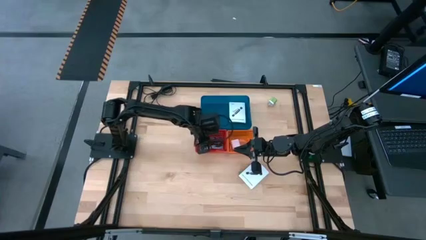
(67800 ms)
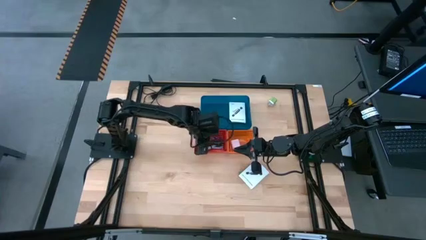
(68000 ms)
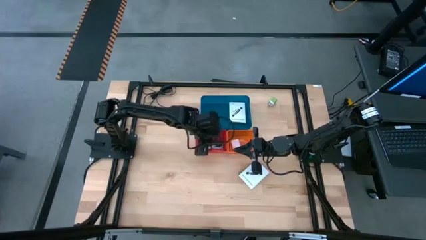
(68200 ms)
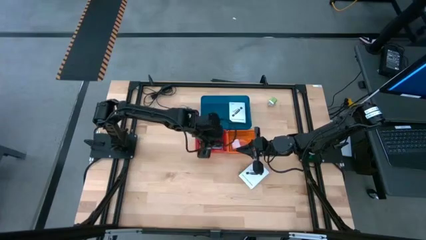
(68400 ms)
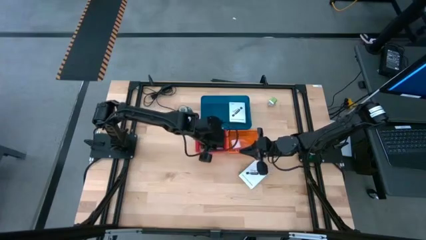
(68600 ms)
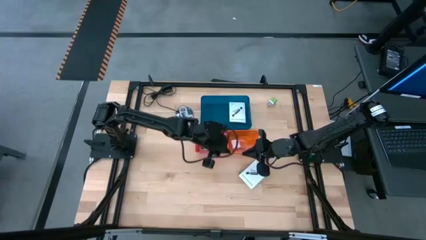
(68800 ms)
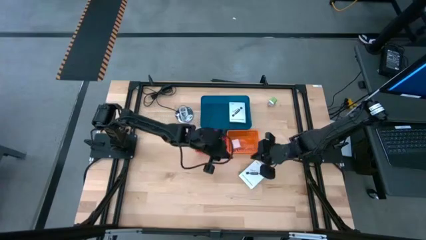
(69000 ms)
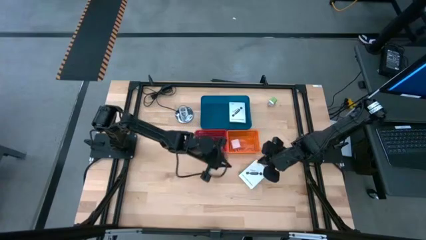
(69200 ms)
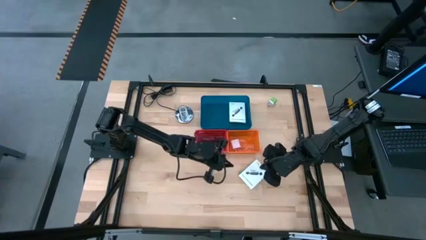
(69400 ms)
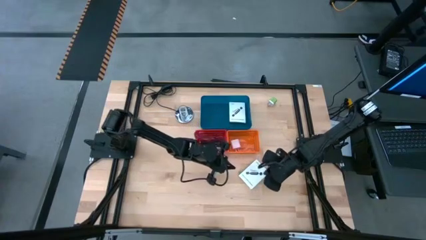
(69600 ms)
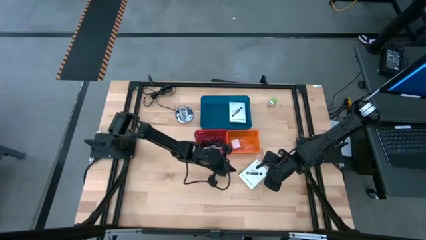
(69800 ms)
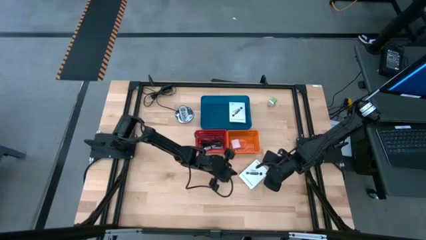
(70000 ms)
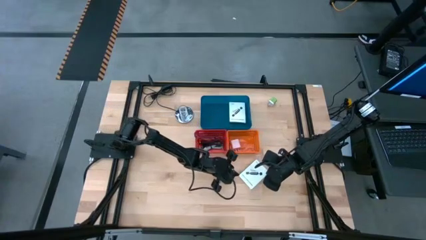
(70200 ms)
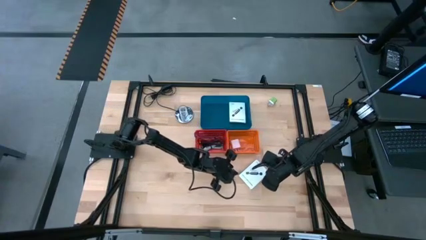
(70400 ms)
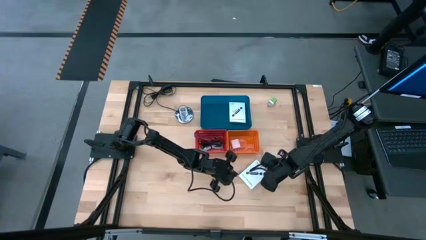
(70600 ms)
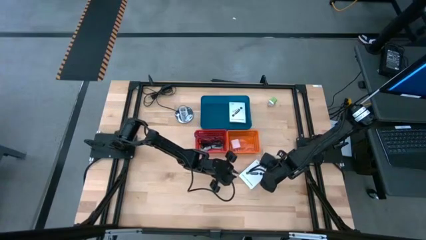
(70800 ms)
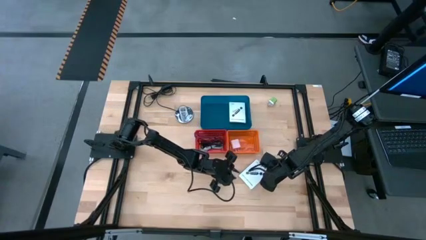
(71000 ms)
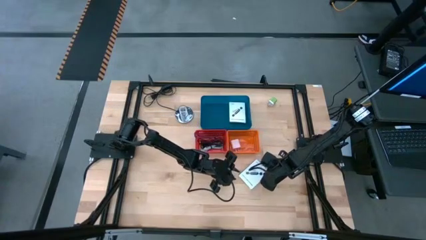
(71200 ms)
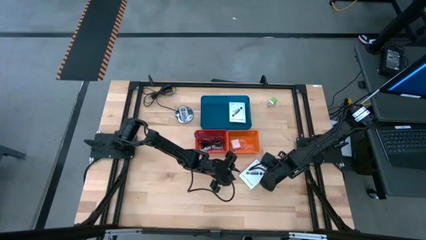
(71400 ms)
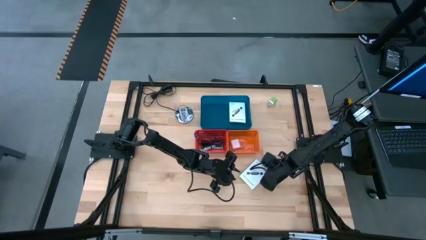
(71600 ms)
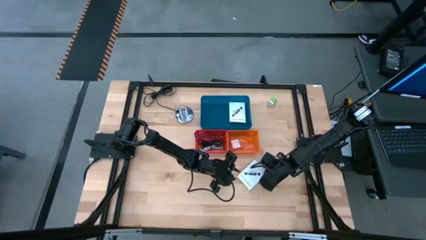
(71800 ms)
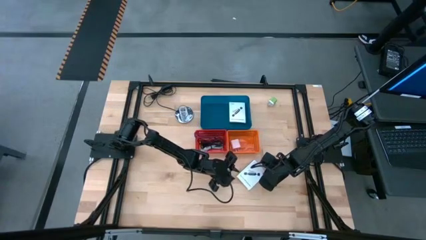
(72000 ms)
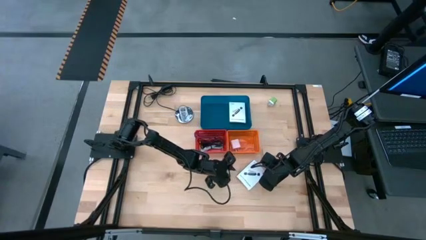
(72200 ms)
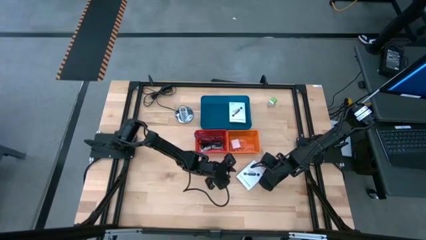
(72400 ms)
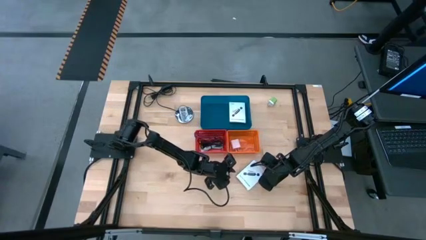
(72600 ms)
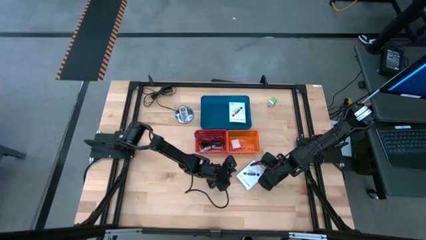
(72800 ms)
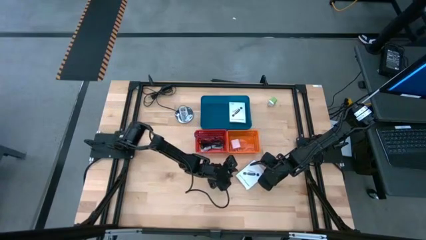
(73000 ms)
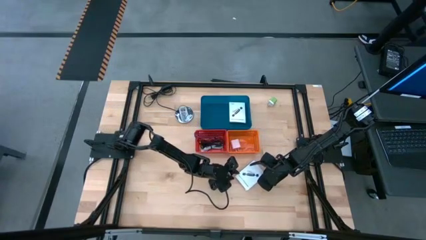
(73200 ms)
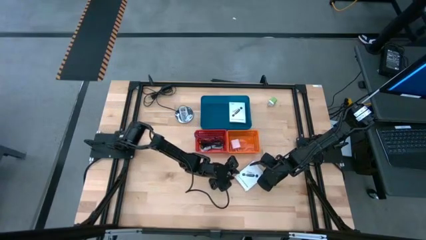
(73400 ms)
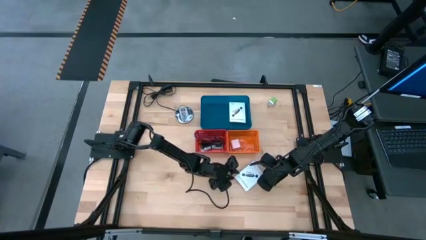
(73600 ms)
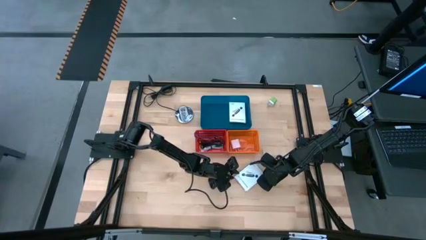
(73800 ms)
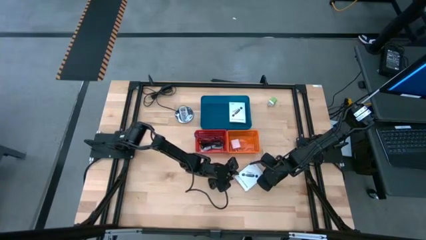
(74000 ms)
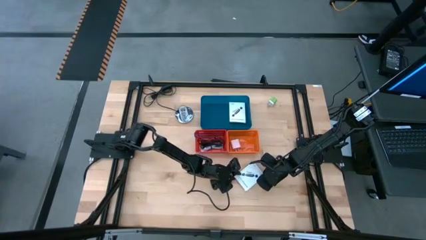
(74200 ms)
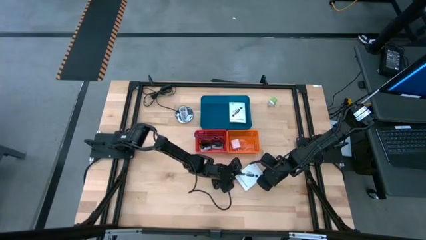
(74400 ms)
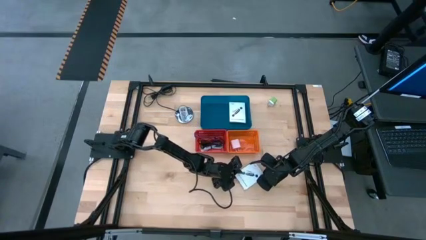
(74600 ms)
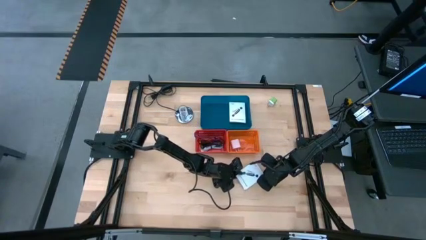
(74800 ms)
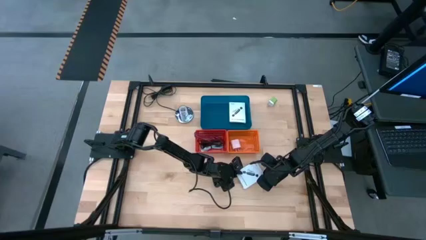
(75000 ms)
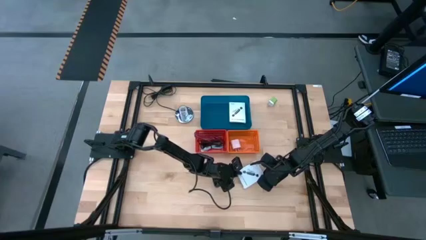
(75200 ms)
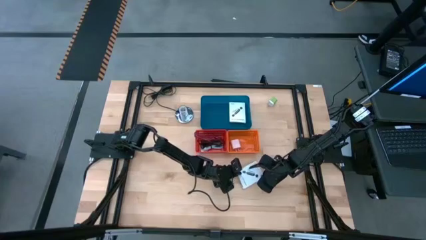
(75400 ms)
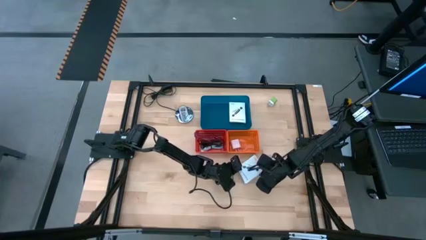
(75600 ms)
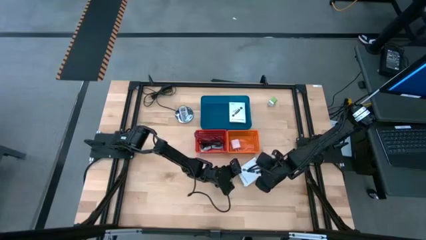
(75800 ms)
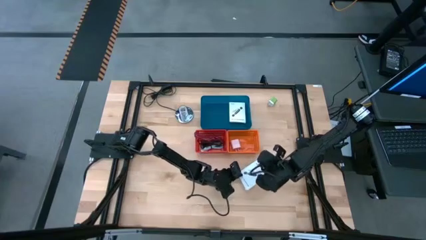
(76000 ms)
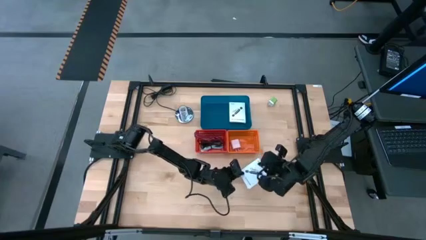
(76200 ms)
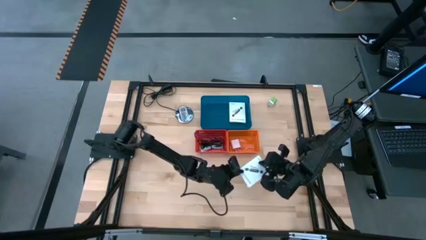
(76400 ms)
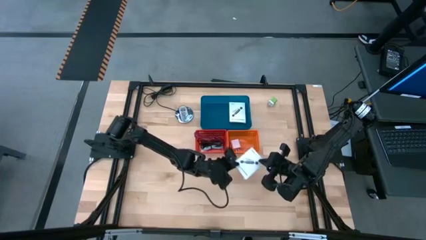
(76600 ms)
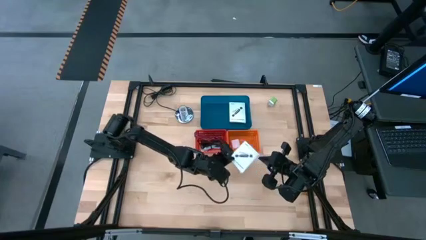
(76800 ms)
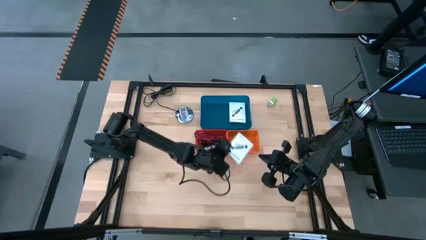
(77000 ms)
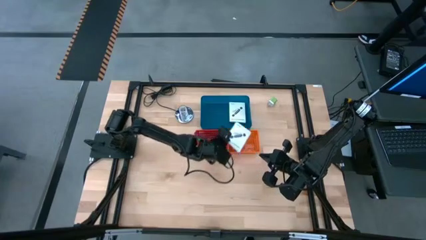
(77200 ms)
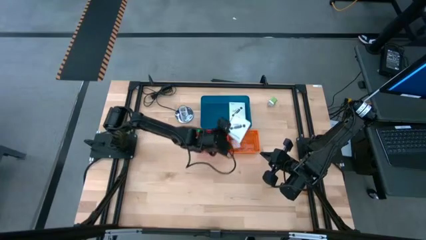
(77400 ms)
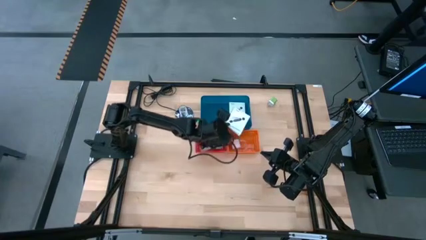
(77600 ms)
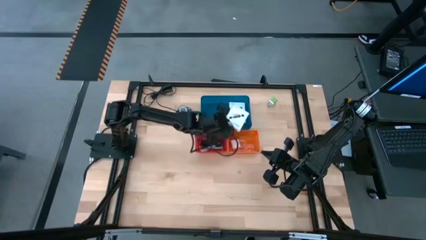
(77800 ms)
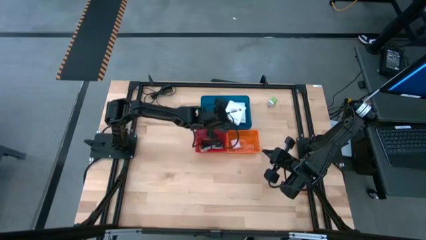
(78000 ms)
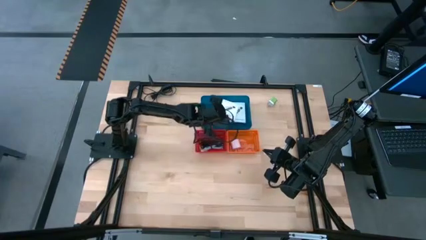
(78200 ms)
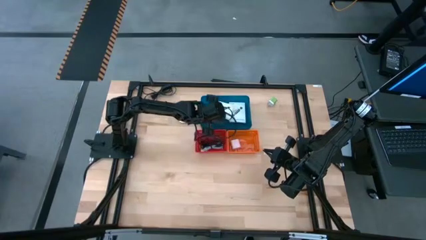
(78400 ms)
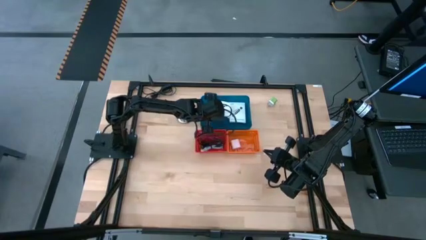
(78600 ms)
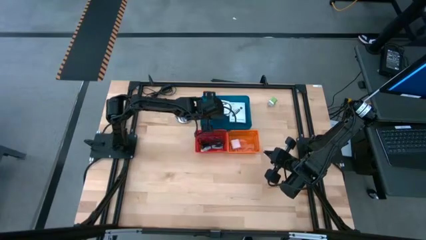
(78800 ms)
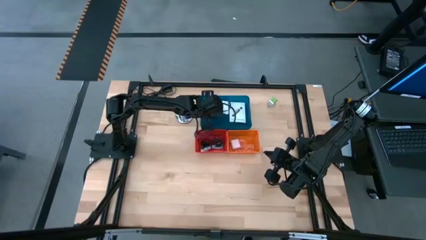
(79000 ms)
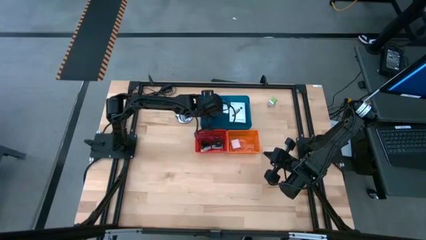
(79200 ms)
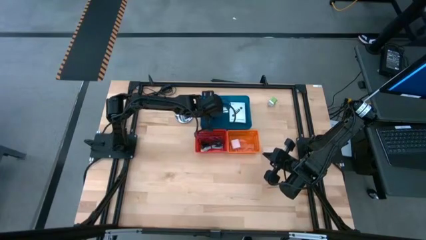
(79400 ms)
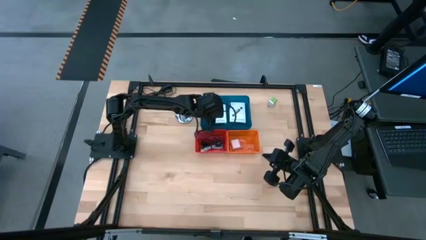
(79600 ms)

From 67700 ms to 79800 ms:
Task: Pick and place items into bin
Put the white card reader box into the blue bin

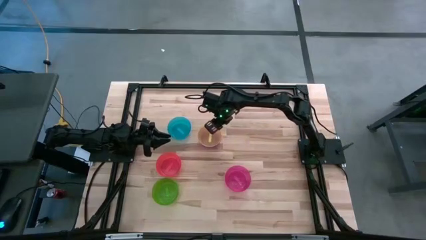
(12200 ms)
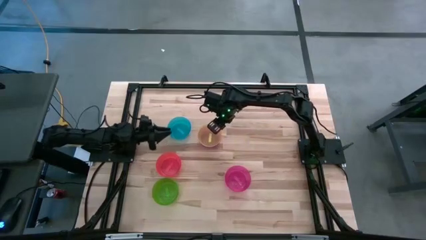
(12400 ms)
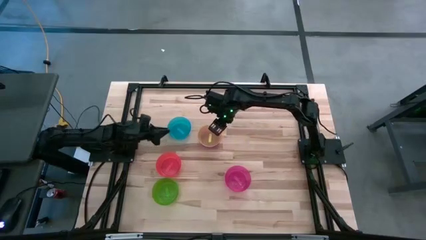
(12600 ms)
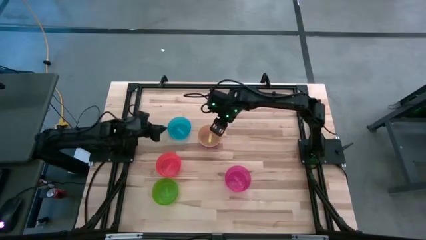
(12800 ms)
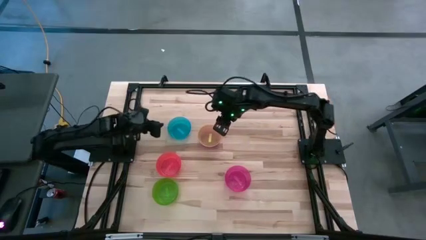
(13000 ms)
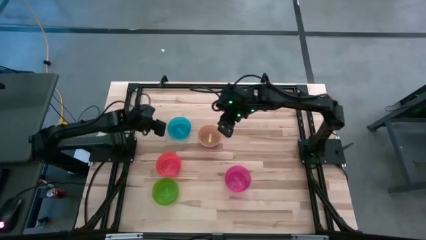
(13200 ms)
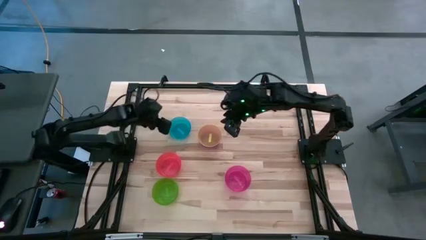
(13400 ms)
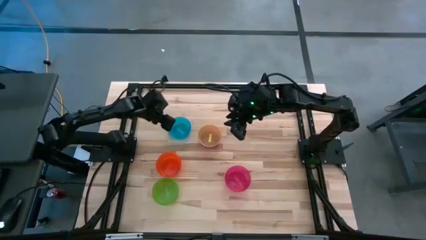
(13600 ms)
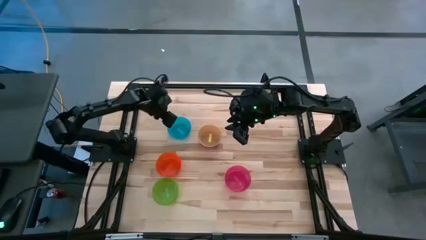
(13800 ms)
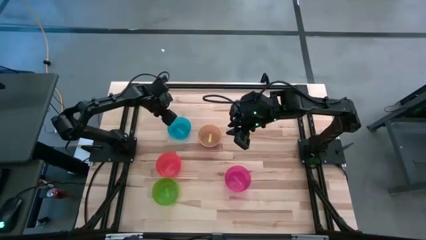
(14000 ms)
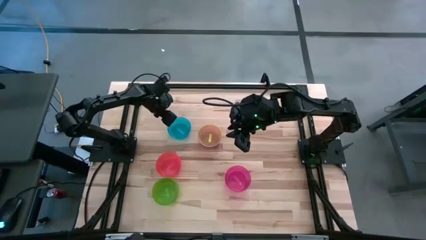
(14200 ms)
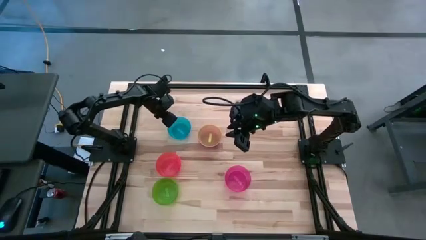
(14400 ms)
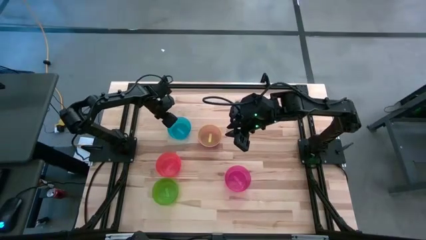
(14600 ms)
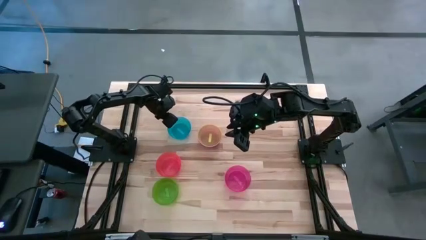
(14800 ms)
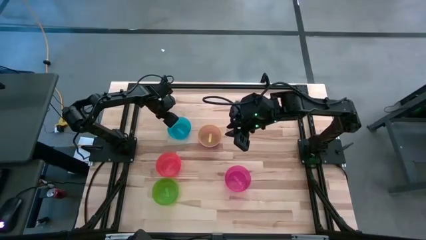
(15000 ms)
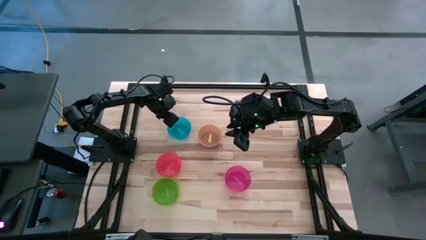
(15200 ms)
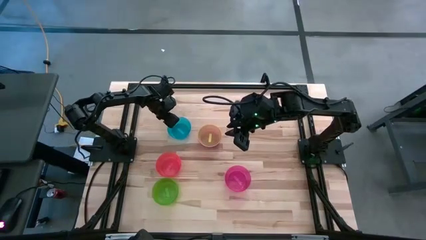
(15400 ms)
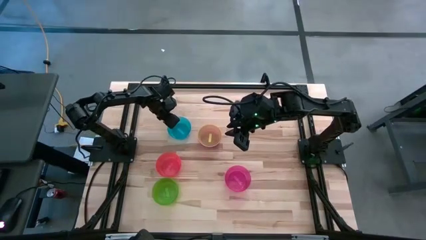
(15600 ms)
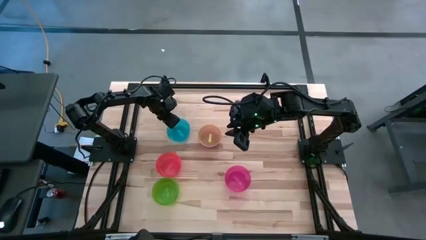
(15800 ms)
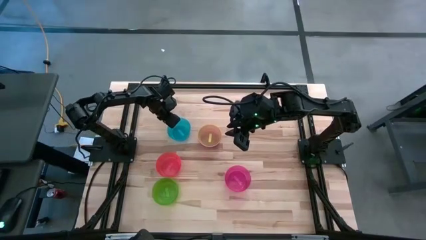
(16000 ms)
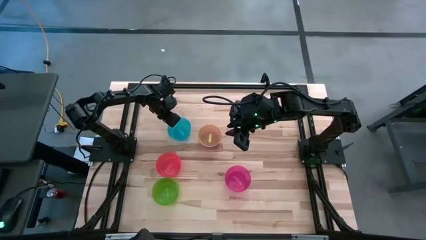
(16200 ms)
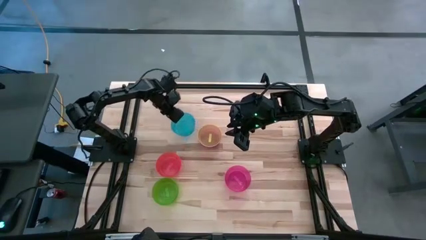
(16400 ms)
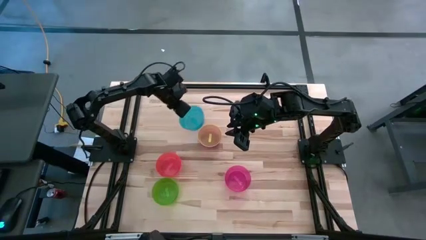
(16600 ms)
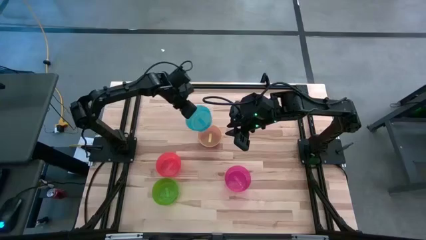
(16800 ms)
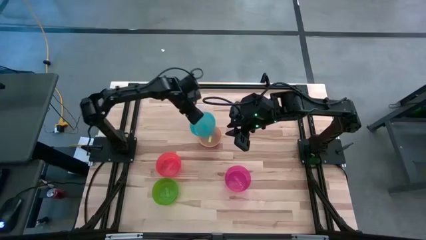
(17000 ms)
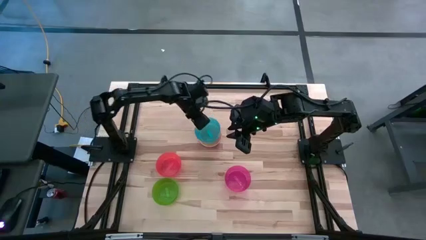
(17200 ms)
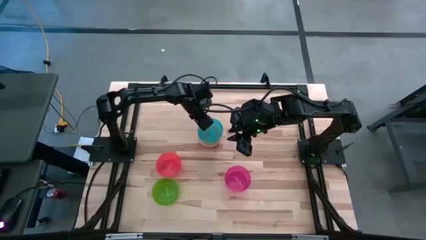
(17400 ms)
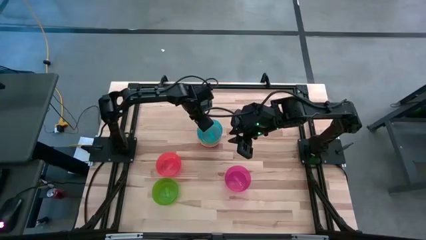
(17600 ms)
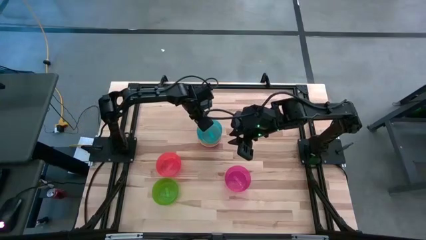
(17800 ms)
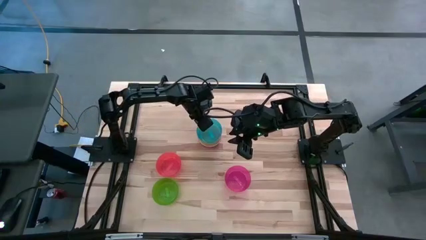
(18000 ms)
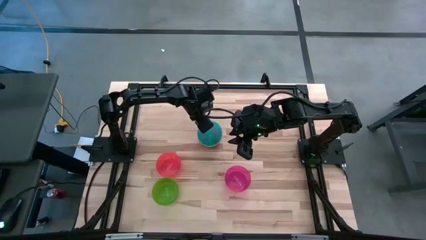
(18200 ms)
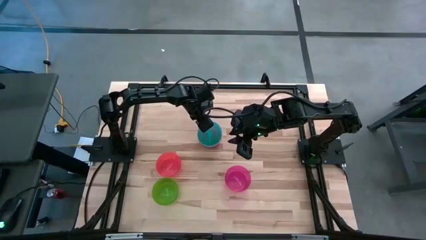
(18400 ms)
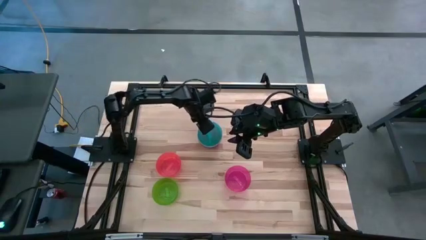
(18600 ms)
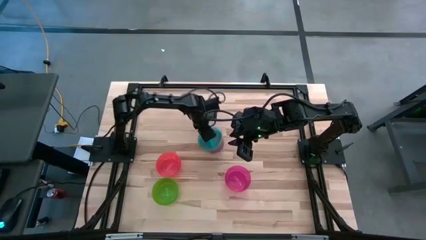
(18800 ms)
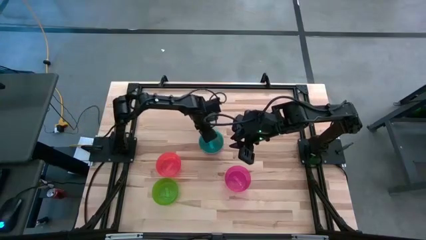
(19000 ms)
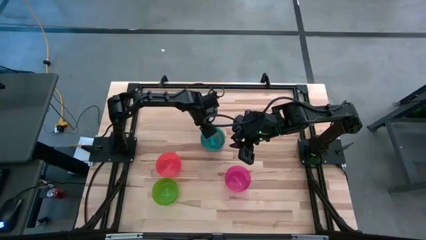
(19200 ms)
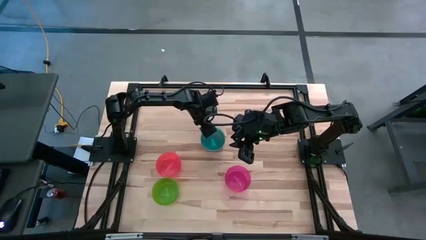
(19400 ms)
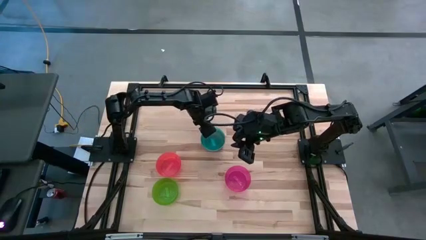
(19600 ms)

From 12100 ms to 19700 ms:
Task: Nest bowls inside each other
Stack the blue bowl on top of the yellow bowl
